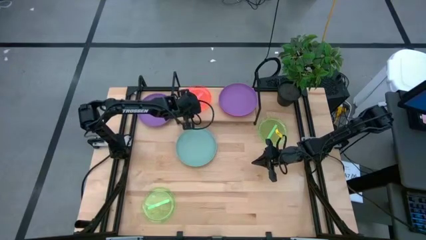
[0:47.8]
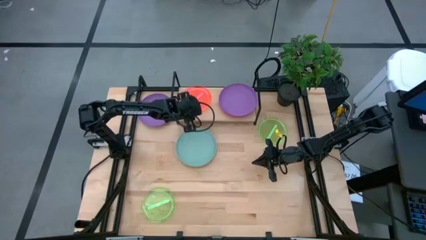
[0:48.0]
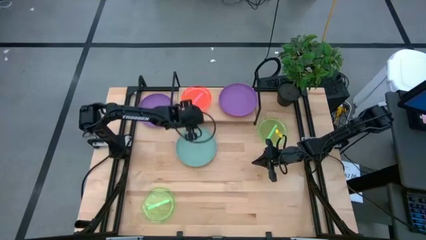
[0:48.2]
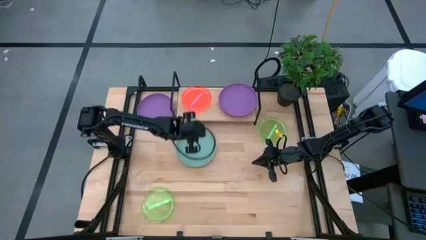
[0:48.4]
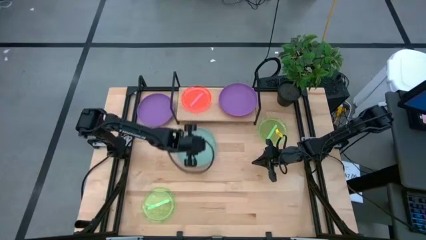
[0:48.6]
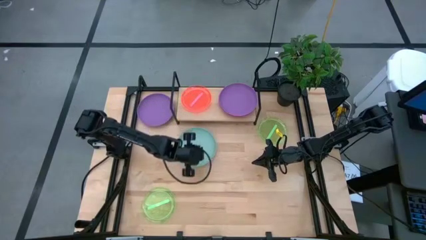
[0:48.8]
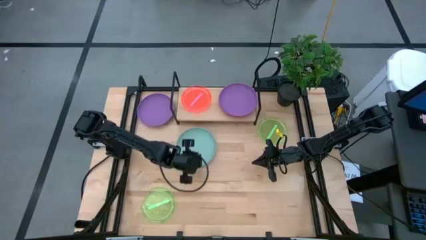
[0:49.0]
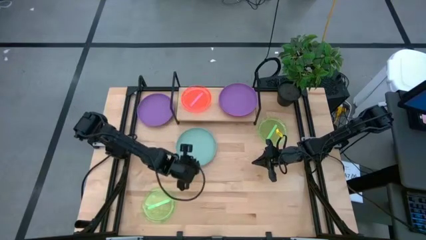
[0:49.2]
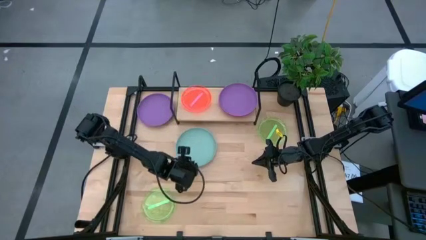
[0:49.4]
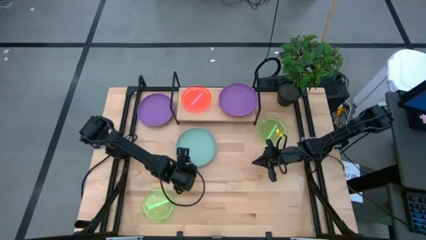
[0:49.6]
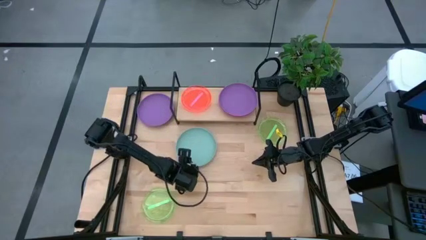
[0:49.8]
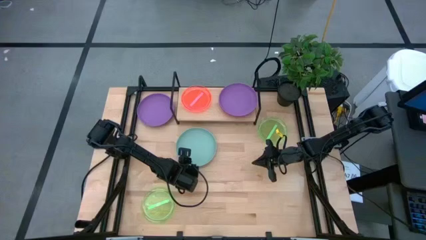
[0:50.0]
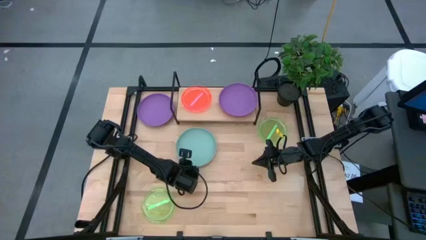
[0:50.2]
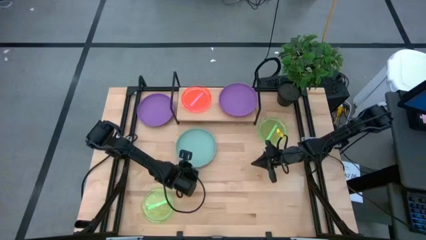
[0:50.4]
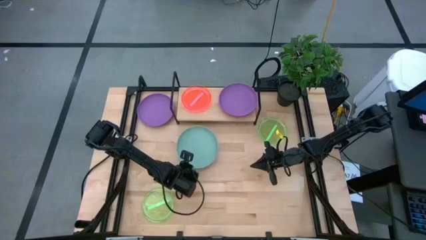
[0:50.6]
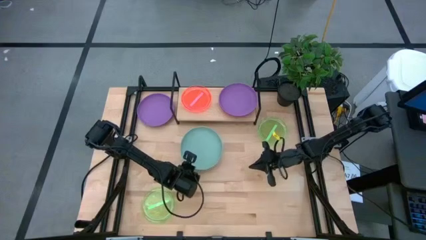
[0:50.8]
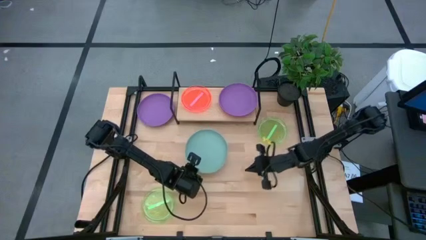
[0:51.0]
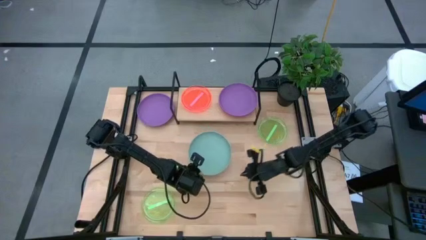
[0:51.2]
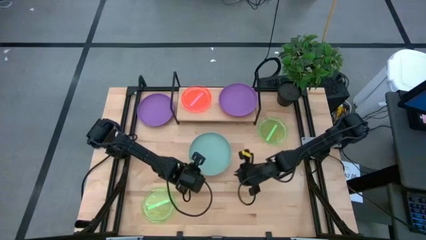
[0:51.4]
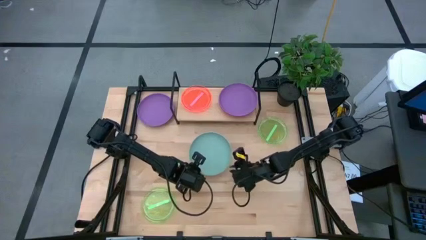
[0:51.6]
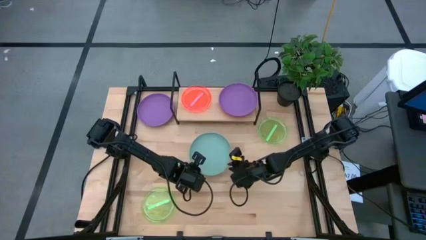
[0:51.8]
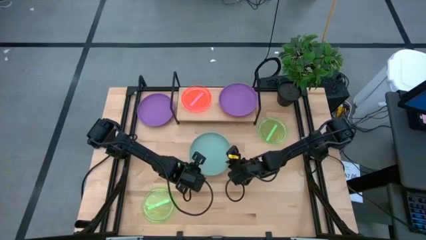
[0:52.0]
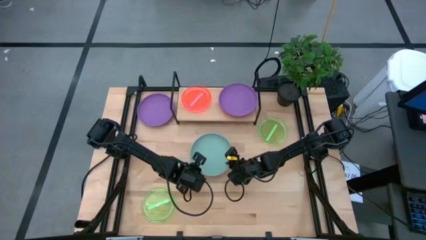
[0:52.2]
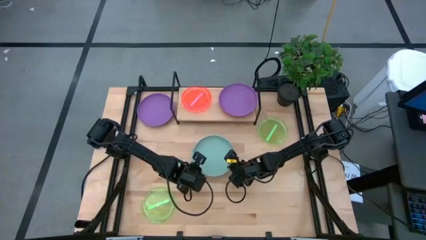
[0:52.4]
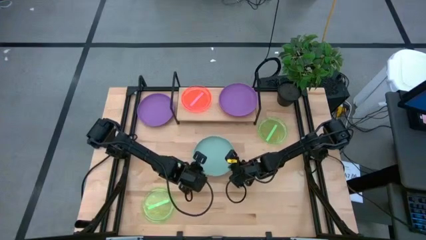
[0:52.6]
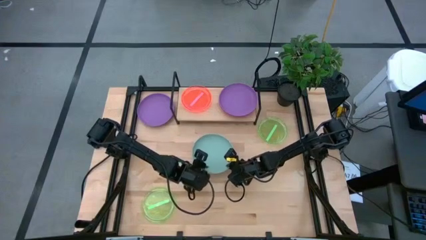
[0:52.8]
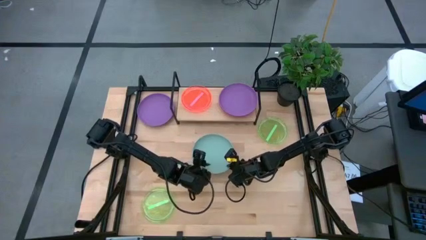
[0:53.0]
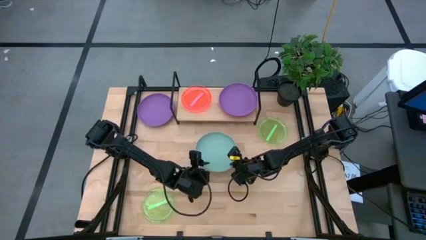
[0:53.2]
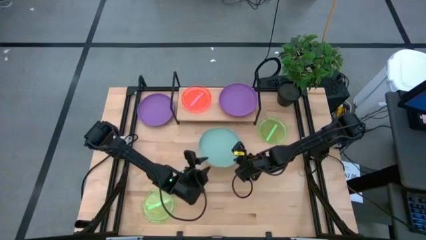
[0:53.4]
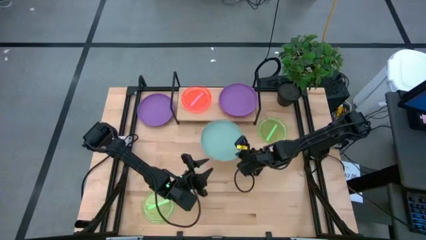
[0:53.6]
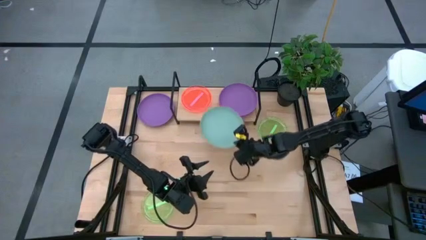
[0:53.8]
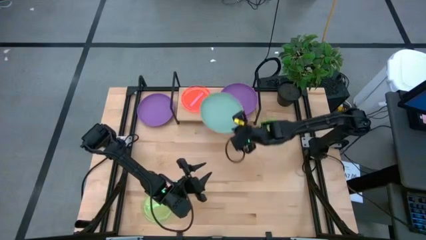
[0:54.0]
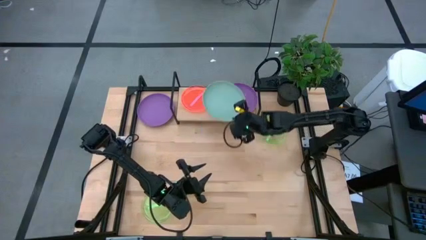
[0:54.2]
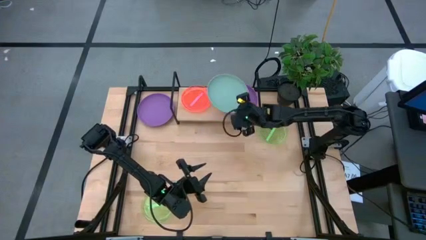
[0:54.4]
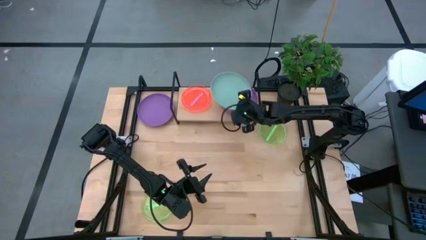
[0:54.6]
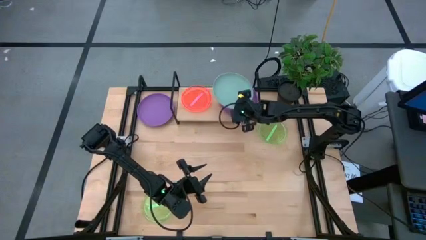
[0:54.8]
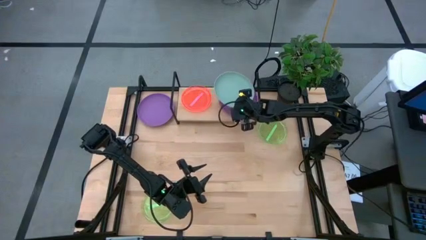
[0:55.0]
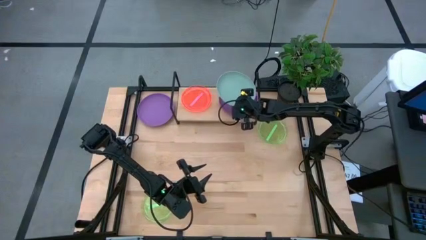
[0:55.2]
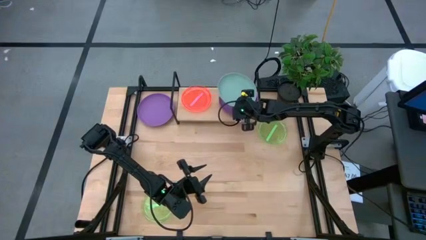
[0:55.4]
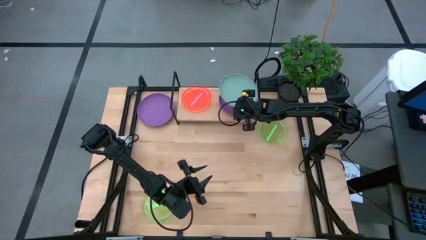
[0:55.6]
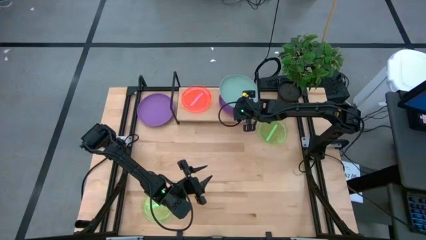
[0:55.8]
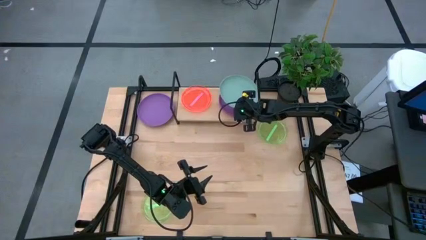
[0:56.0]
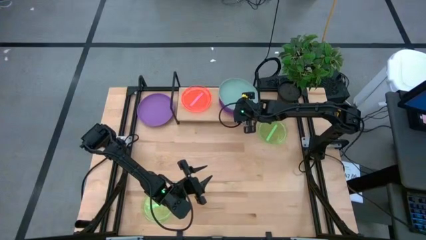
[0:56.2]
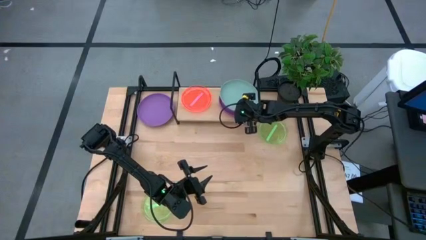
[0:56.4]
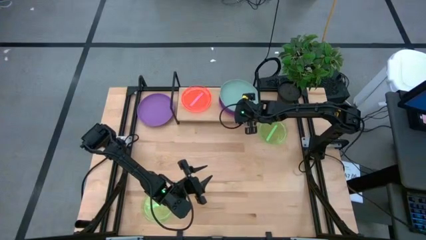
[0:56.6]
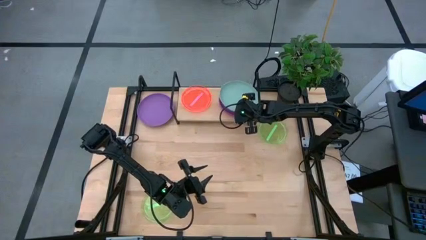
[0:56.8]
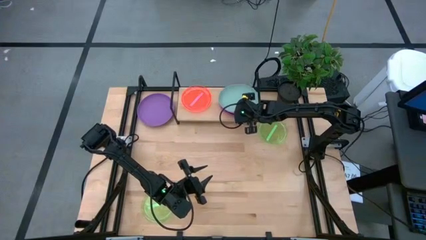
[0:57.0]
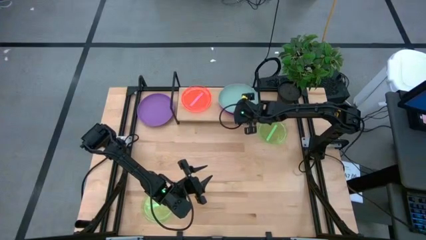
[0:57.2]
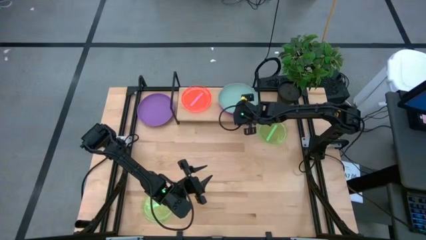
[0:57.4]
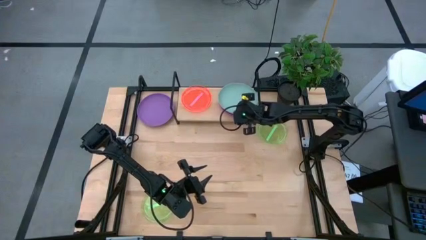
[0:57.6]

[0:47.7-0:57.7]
Task: Place and stack plates onto a shelf
Stack the large blue plate on top of the violet plate on the shelf

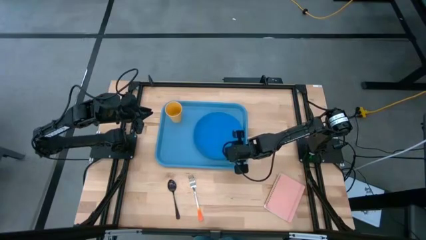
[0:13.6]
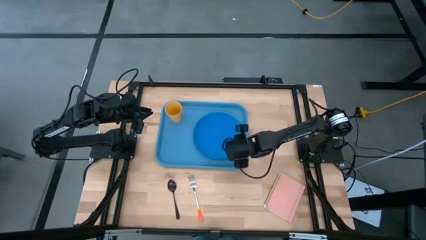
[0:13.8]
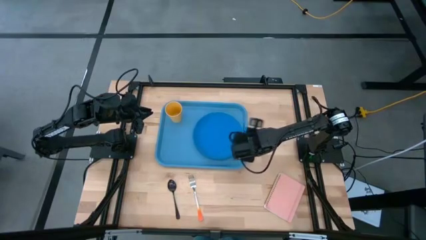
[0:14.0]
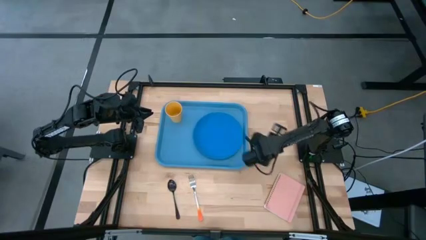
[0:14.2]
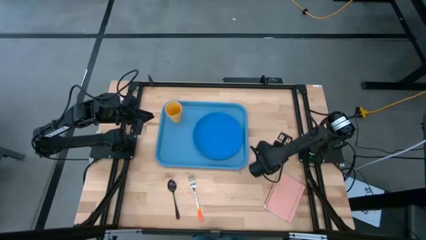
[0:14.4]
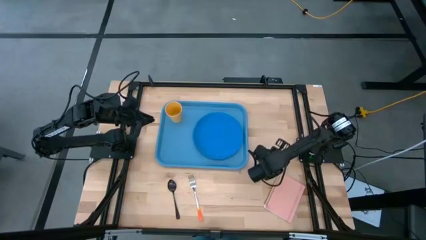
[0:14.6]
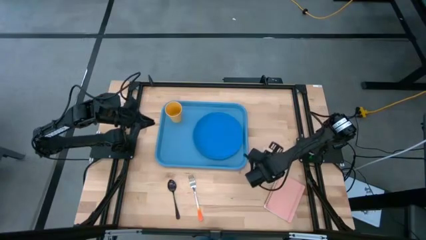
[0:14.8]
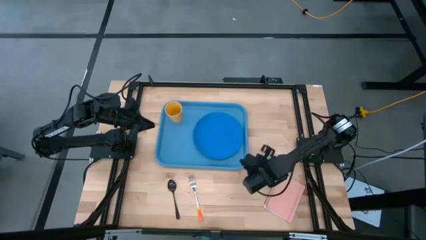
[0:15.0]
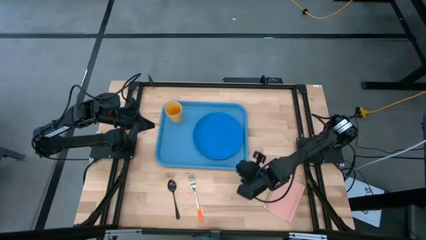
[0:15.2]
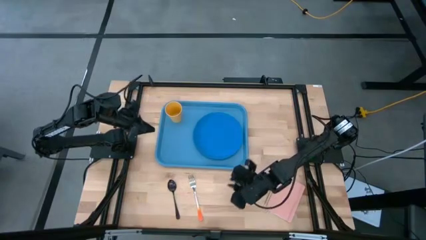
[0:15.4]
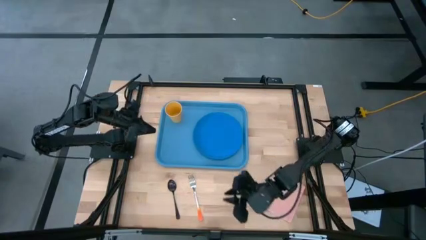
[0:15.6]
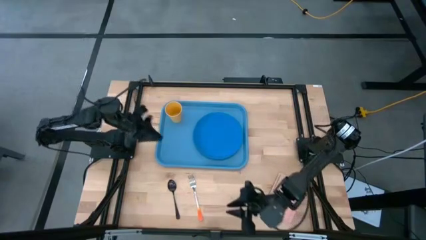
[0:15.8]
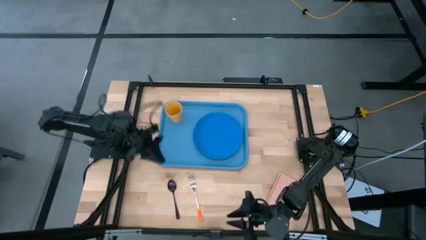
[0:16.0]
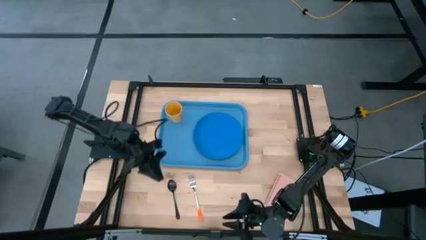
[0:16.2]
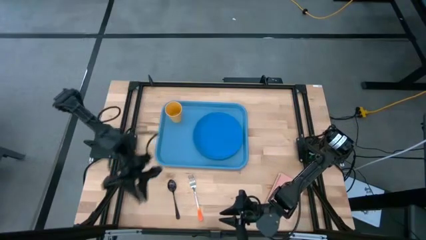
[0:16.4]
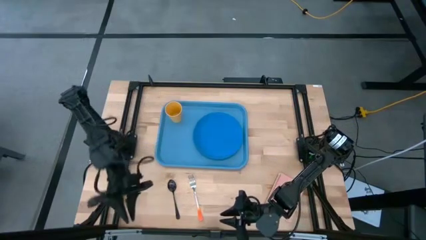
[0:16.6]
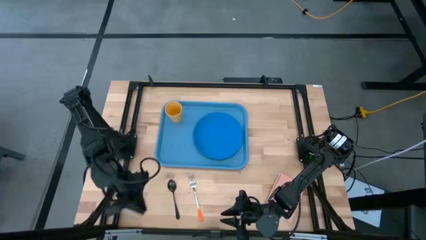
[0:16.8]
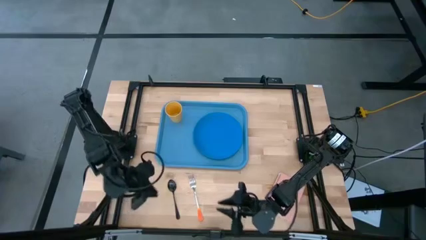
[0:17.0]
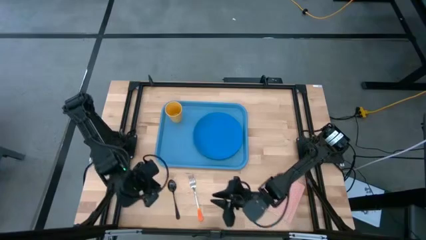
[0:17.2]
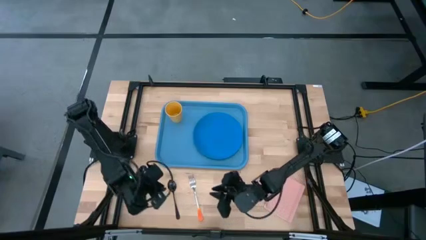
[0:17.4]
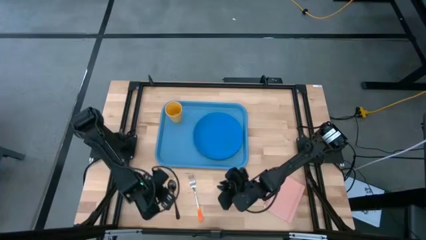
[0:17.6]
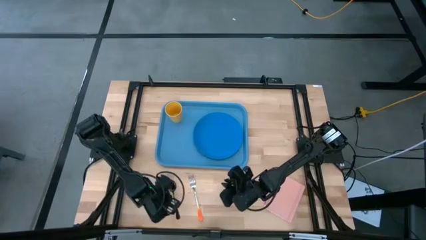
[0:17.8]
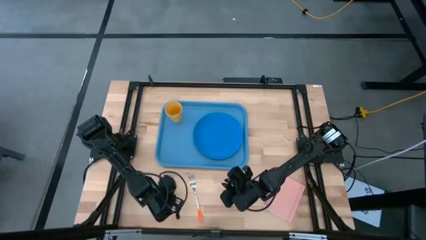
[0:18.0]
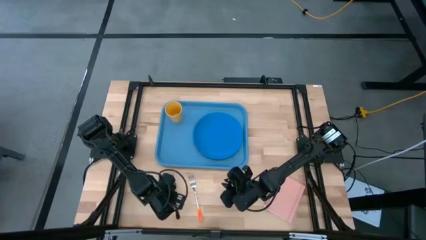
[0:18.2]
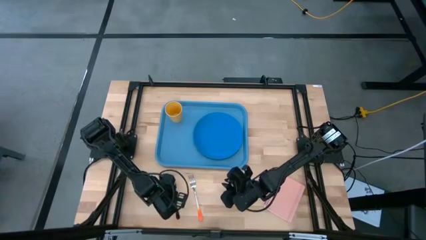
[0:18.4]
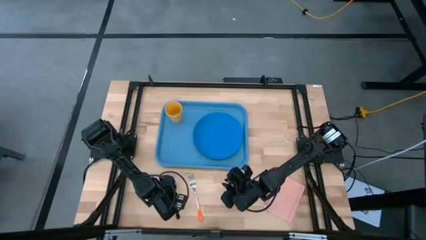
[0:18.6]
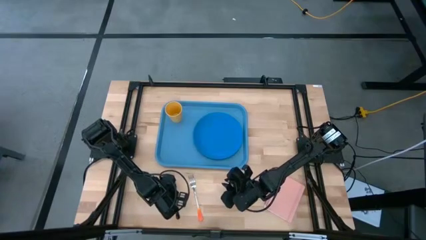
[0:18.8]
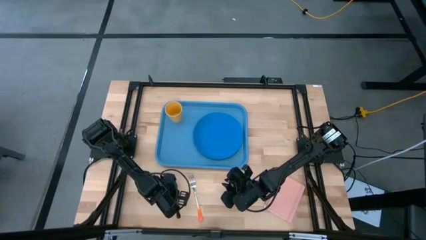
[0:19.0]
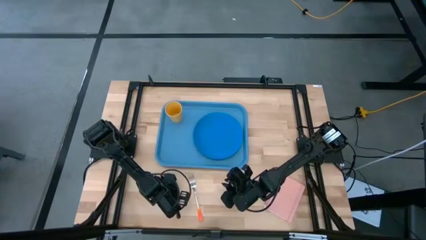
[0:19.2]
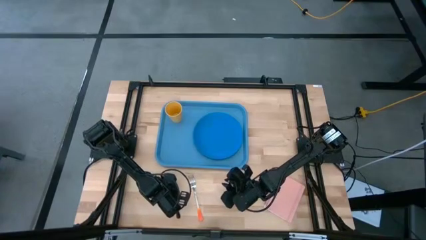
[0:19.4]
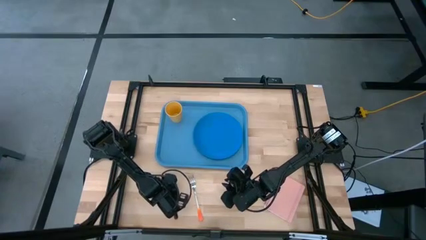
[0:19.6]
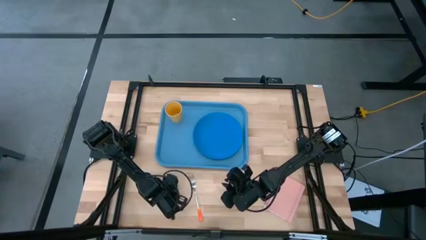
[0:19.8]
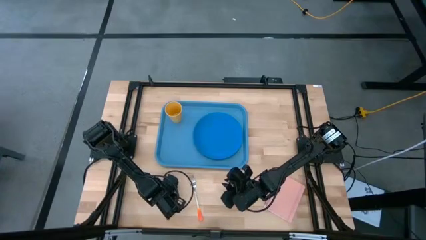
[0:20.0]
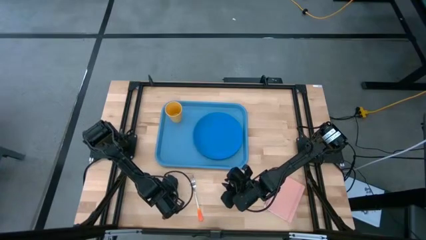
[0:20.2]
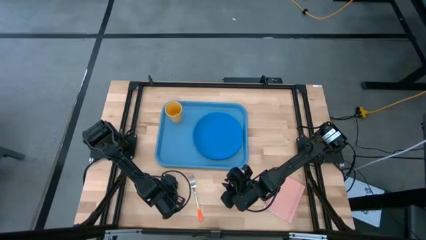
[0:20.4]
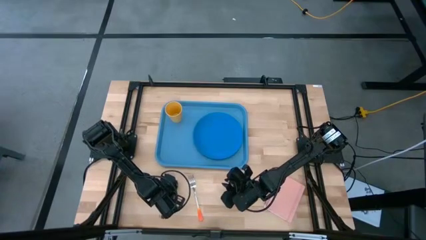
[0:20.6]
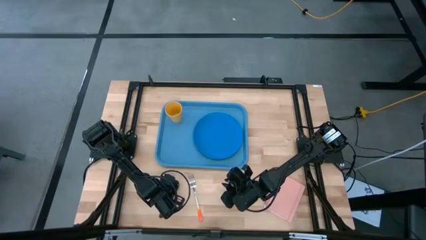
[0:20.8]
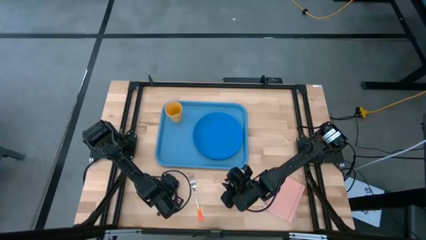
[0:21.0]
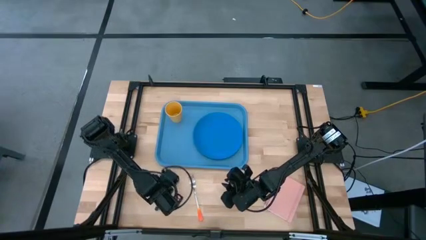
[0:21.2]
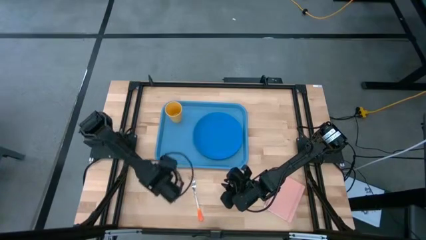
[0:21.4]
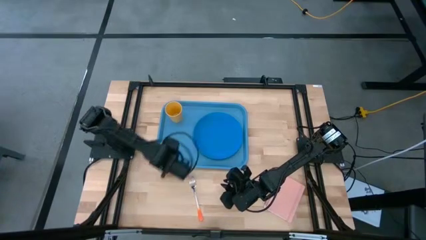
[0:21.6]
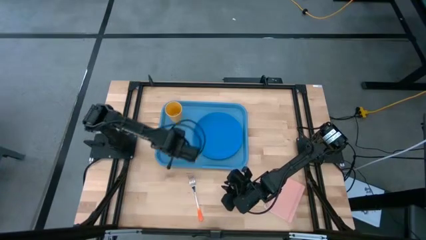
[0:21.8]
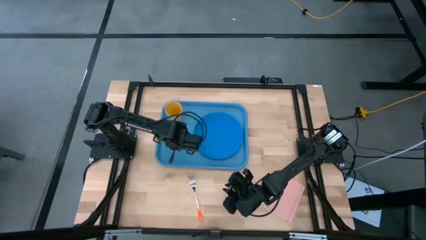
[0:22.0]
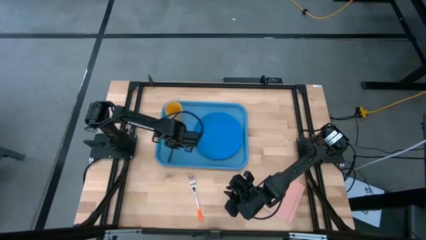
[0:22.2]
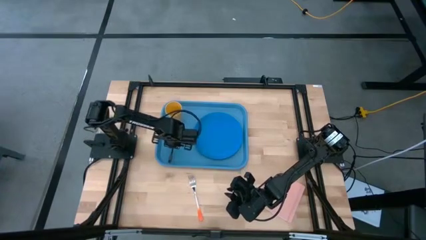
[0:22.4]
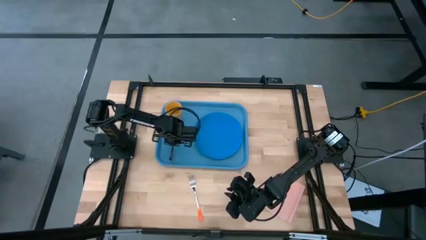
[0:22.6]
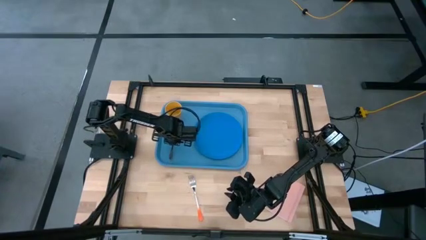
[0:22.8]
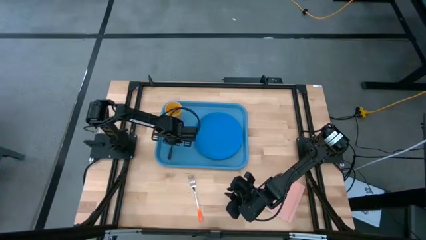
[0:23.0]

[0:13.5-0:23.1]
Task: Pick and place plate/cup/fork/spoon on tray
Put the black spoon on the light blue tray to the bottom of the yellow cup
